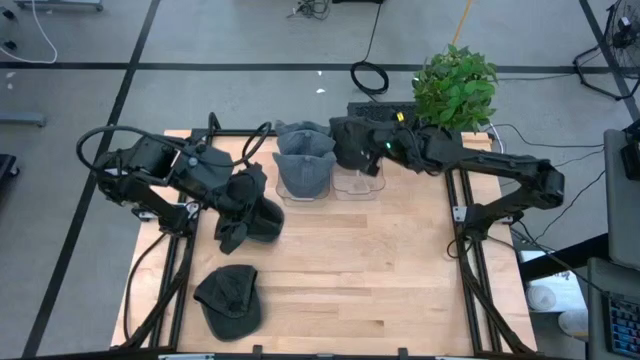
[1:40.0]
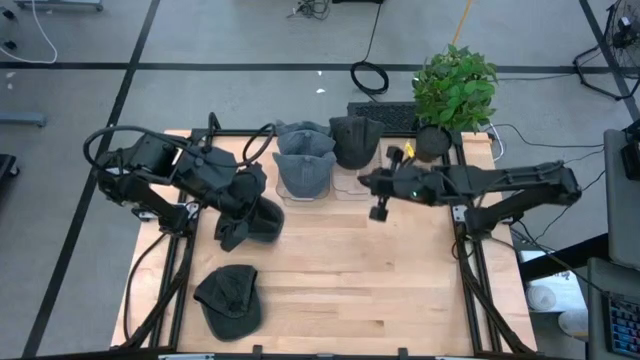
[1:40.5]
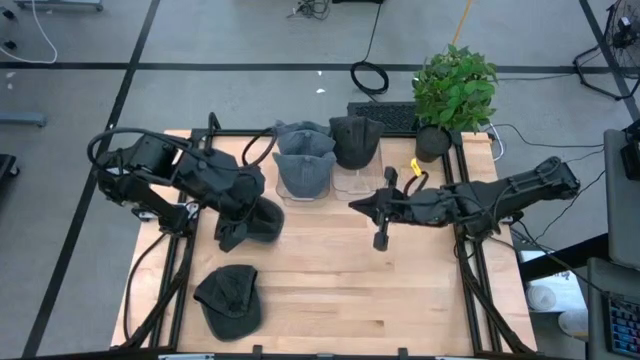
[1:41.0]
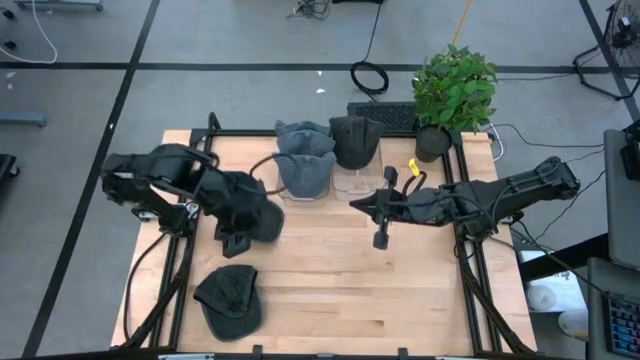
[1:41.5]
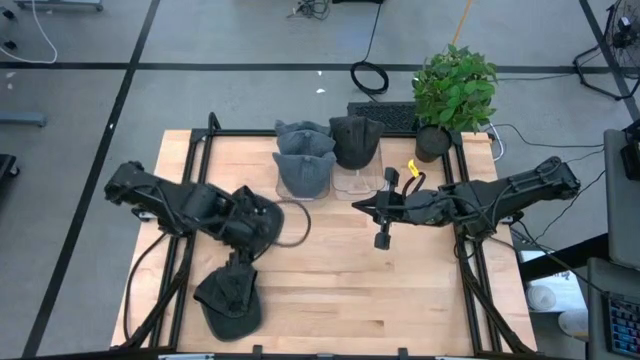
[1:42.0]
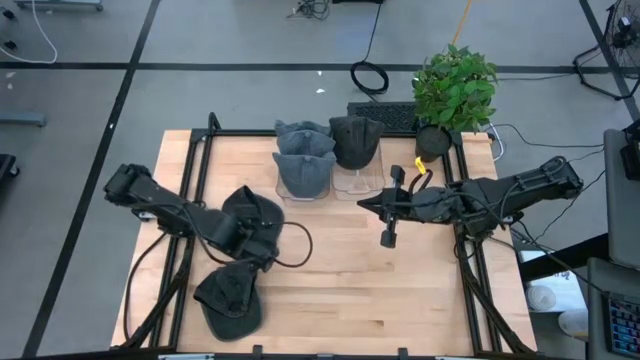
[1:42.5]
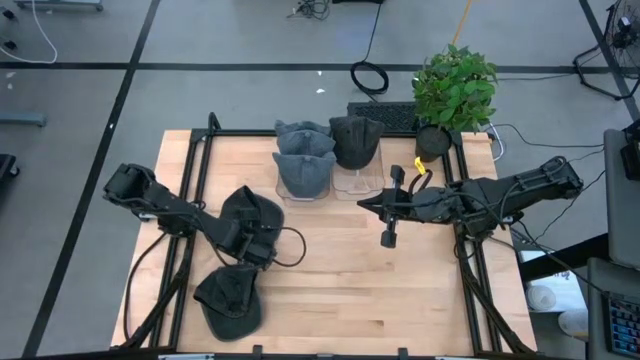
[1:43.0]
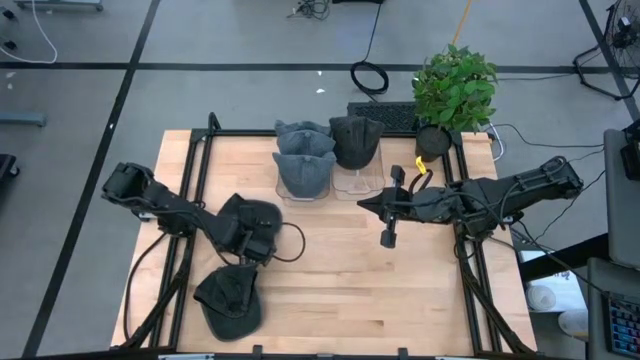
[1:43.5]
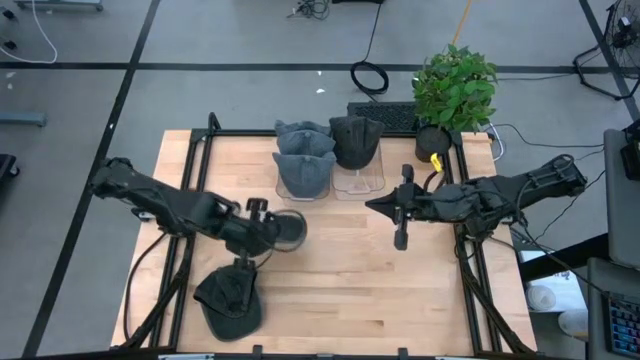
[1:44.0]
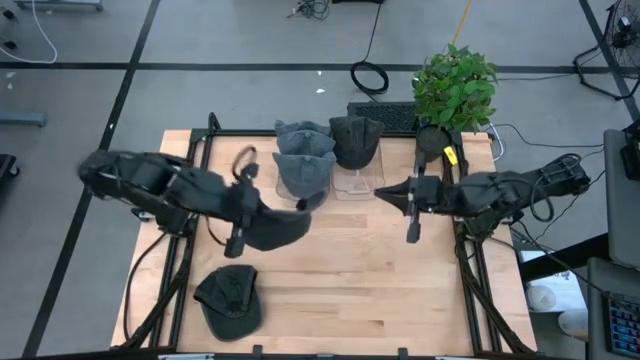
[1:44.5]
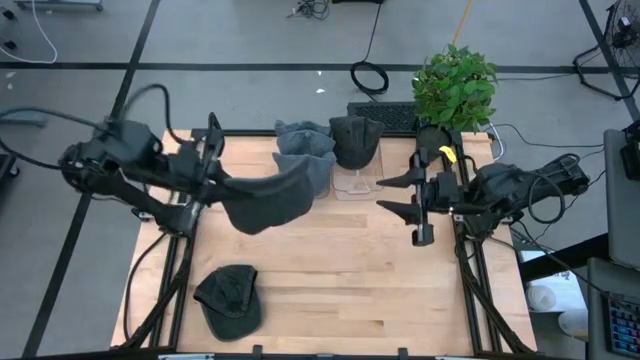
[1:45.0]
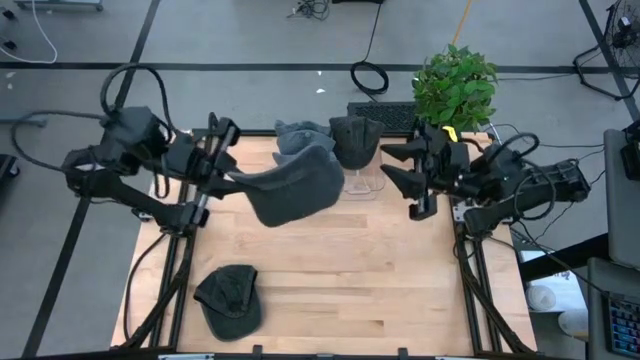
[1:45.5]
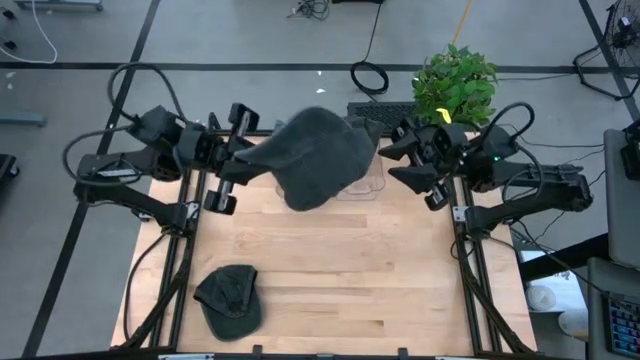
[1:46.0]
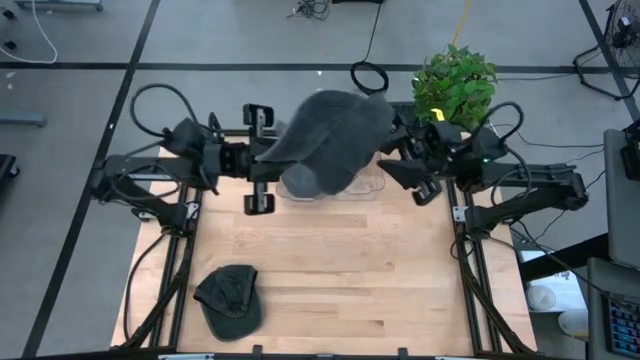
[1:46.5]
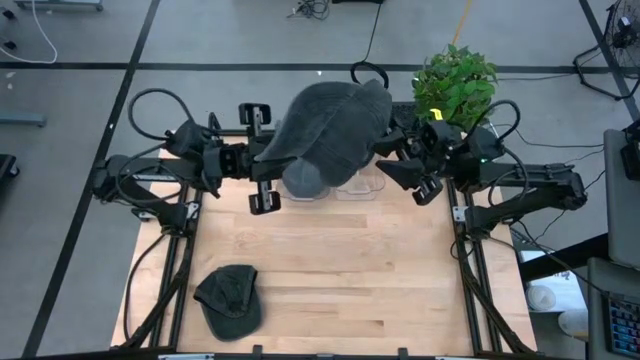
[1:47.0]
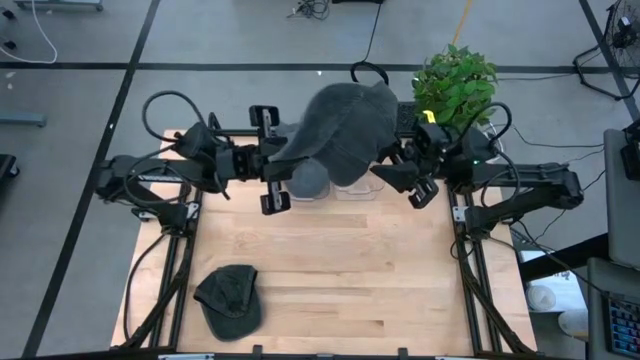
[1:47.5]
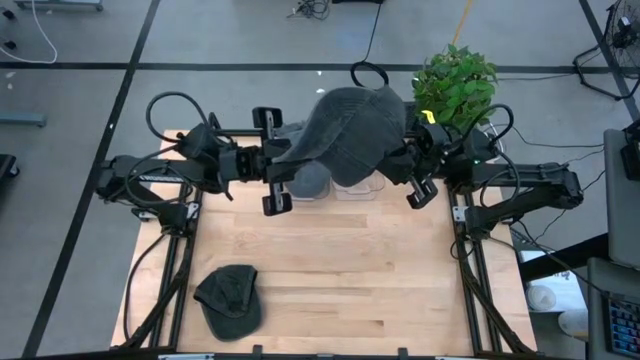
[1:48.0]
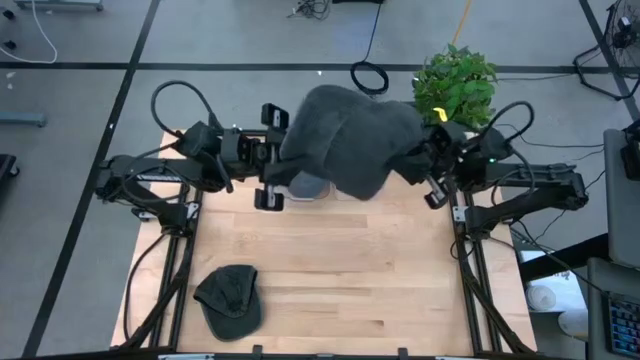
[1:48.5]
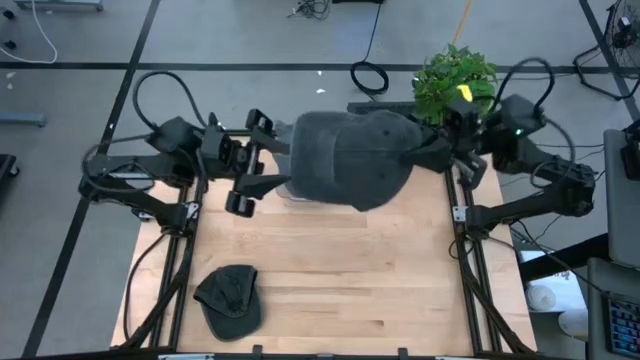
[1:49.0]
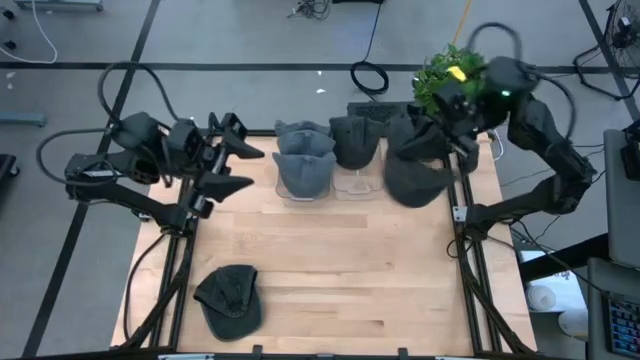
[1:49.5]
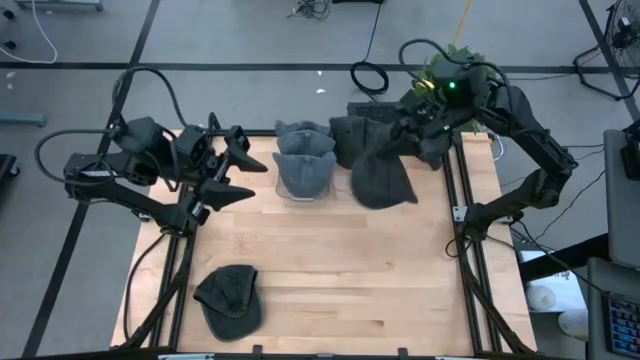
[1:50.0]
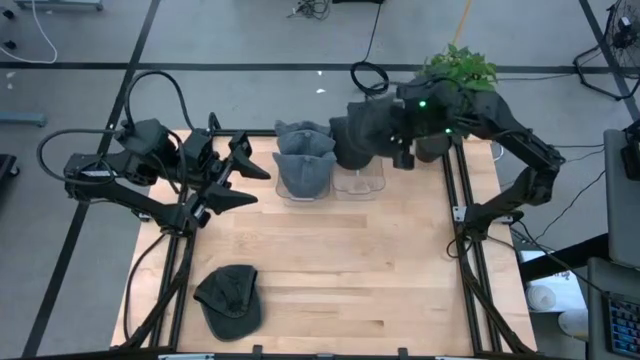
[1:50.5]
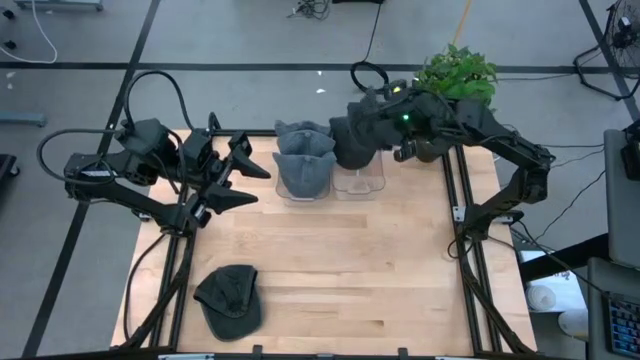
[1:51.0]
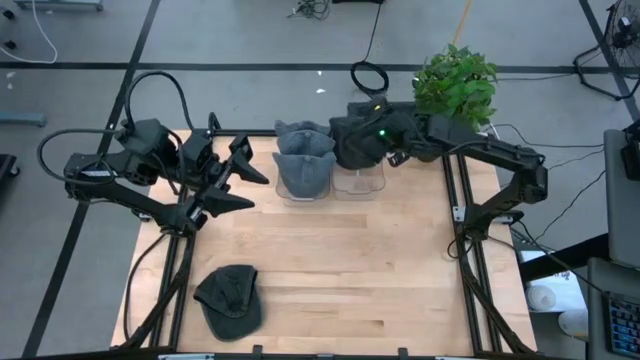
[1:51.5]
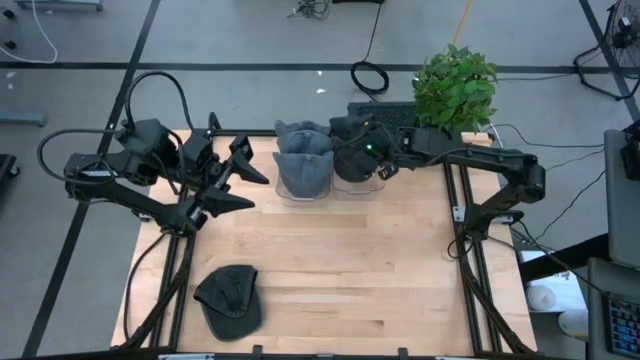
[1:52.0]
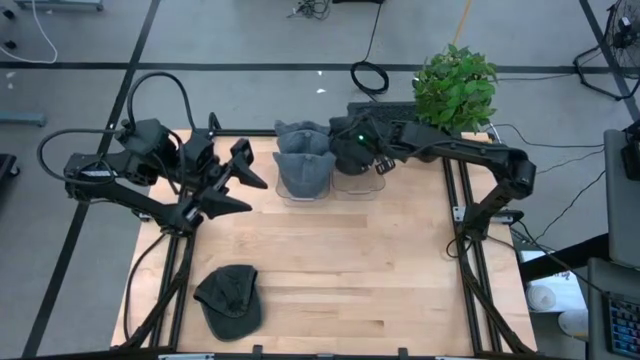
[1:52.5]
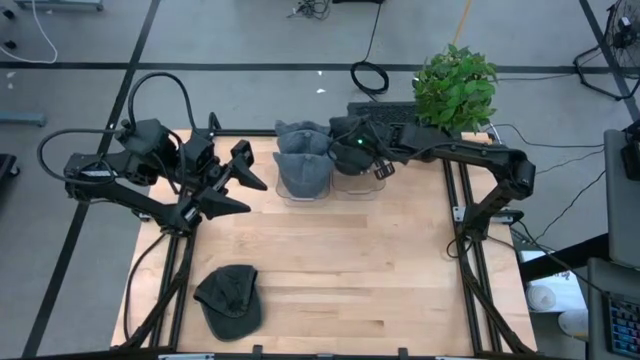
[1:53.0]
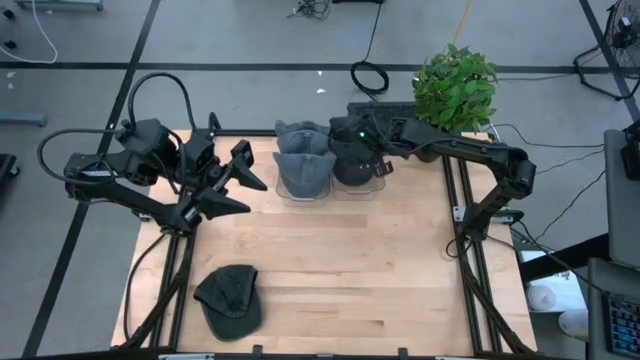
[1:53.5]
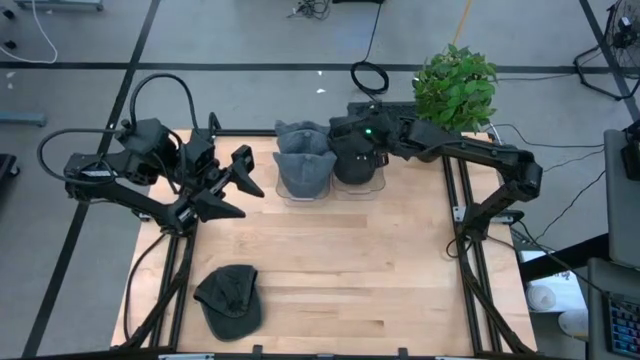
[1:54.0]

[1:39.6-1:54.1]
Task: Pick & Place hat
Put the top black cap into the right transparent bin

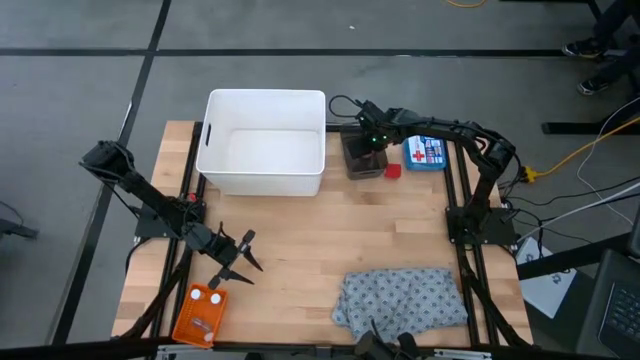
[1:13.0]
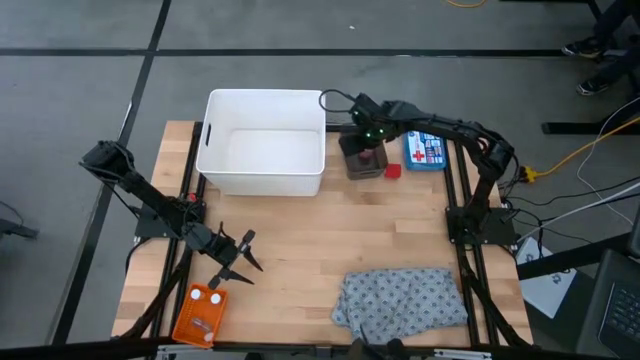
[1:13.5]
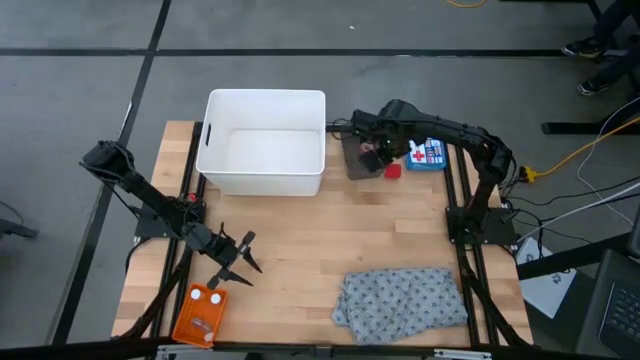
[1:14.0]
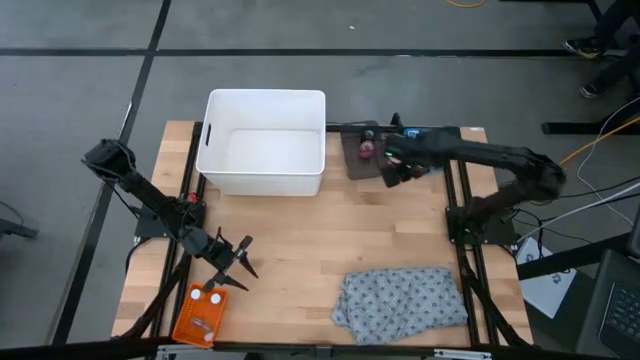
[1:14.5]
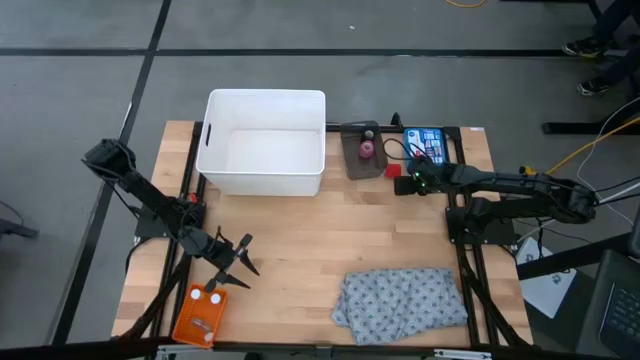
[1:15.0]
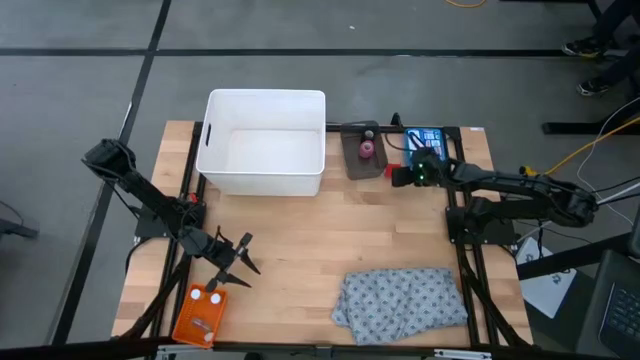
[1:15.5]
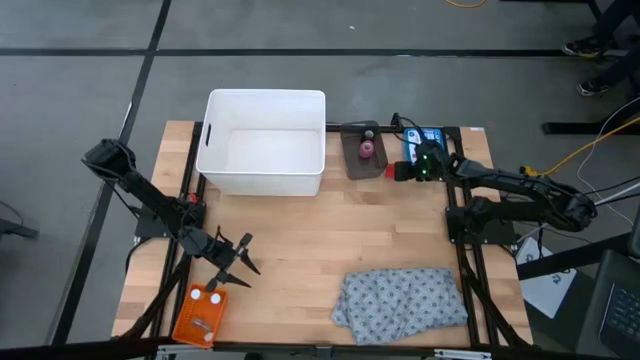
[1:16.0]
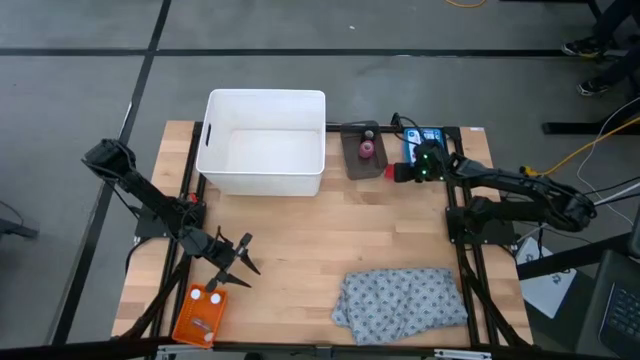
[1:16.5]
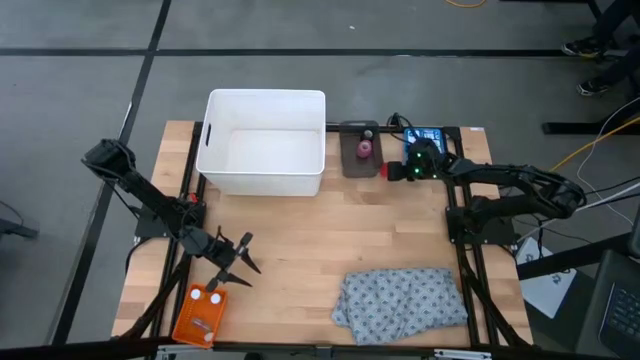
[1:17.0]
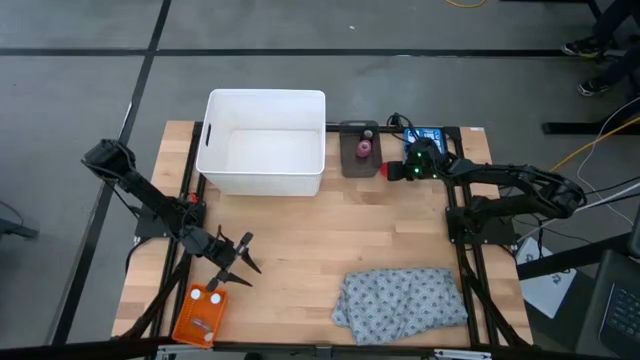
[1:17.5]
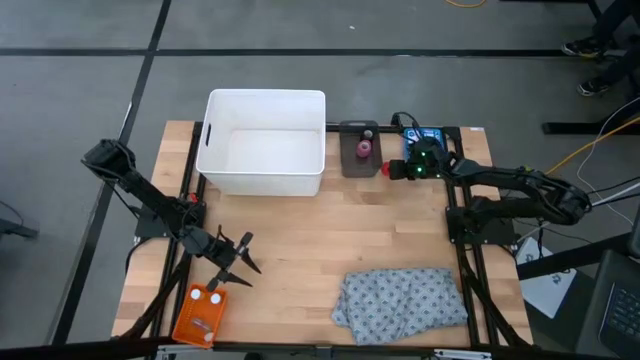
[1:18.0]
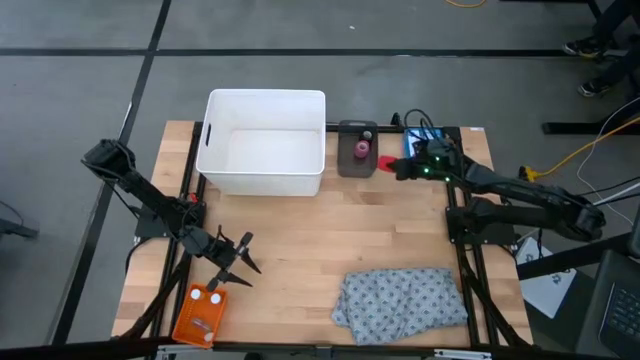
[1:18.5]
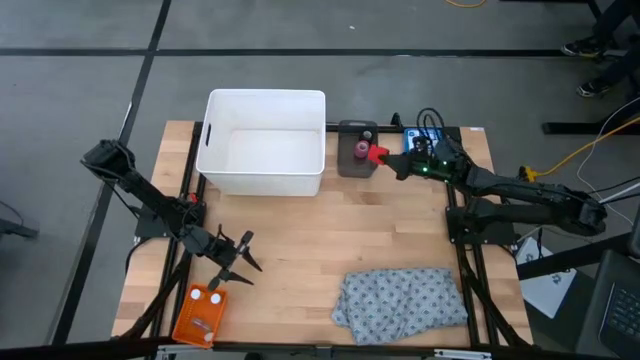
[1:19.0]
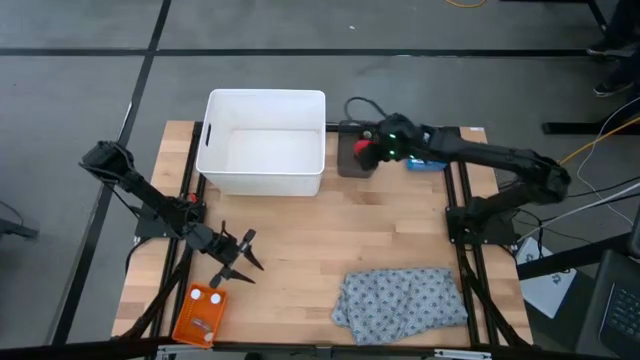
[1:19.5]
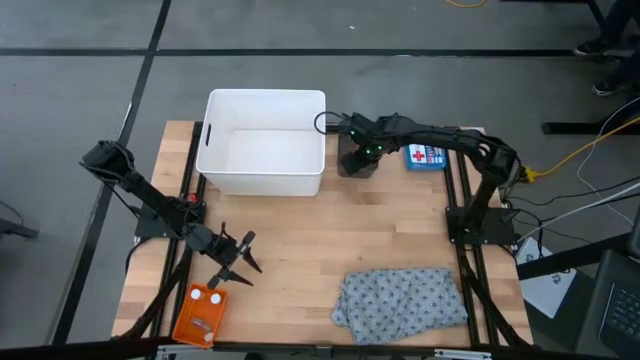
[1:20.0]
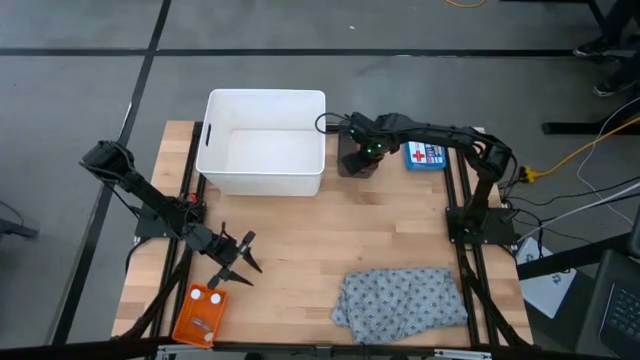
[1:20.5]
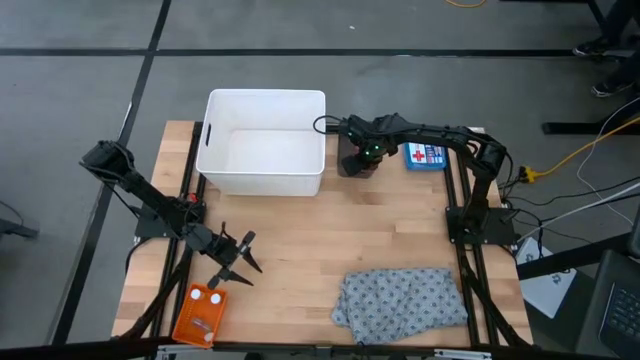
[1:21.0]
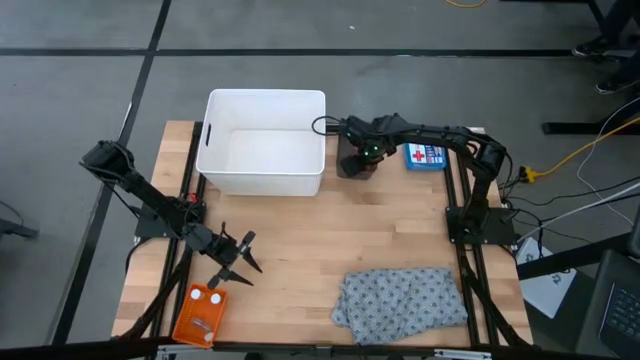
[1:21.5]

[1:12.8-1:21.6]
Task: Pick & place medical supplies in basket/bin
Put the red bandage into the black bin
